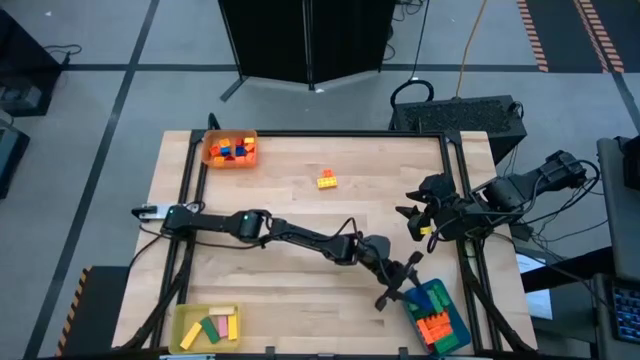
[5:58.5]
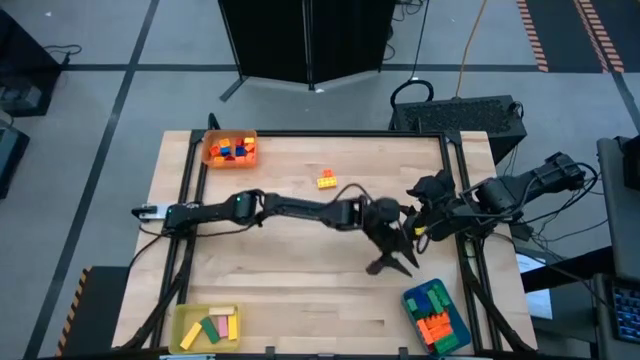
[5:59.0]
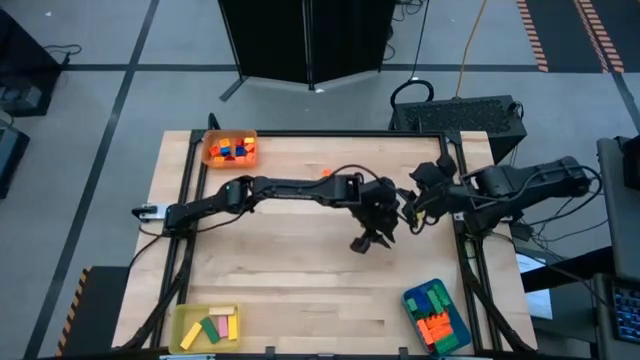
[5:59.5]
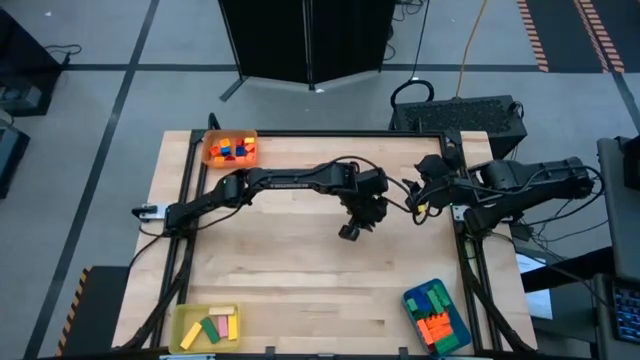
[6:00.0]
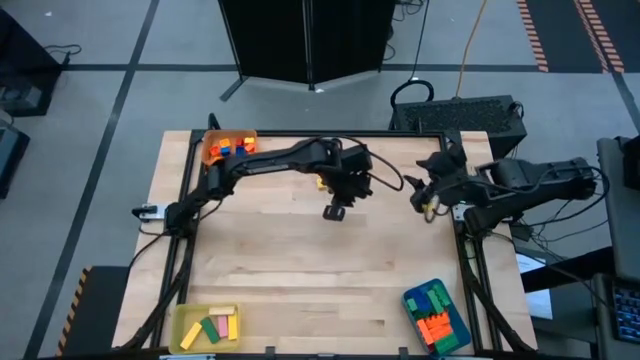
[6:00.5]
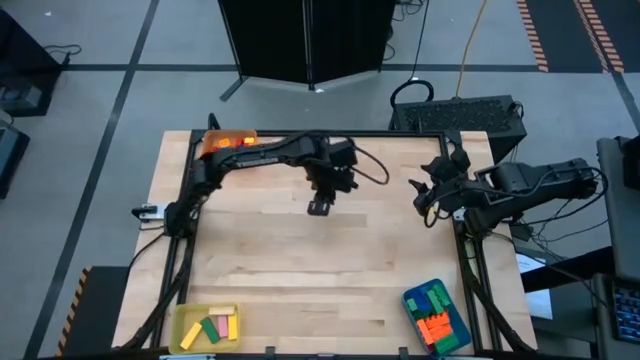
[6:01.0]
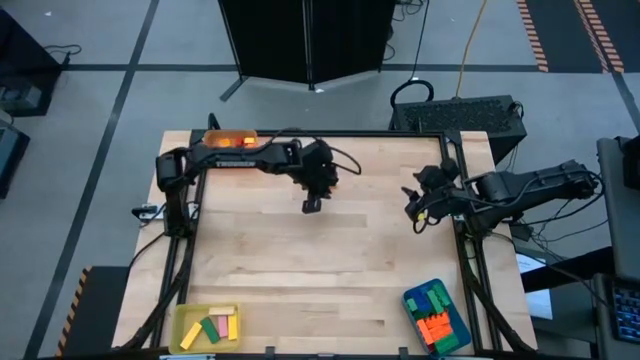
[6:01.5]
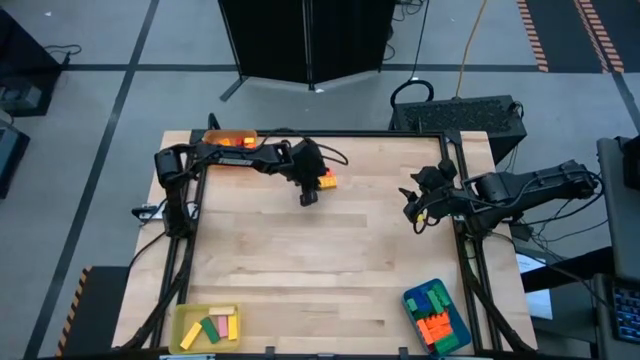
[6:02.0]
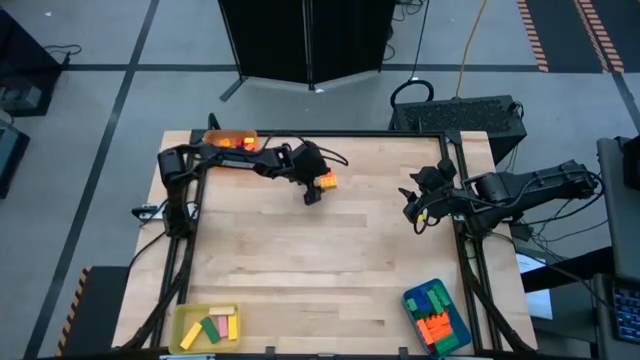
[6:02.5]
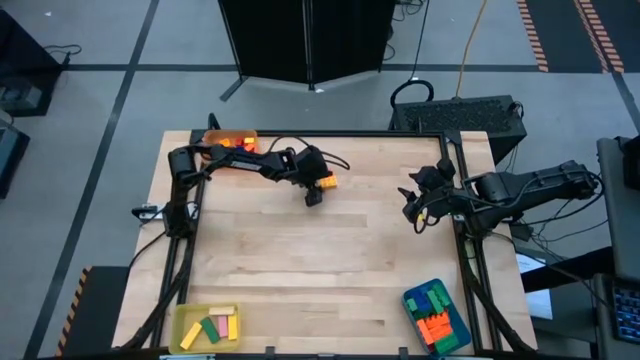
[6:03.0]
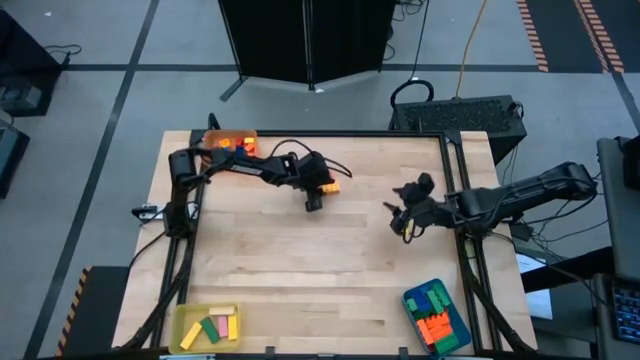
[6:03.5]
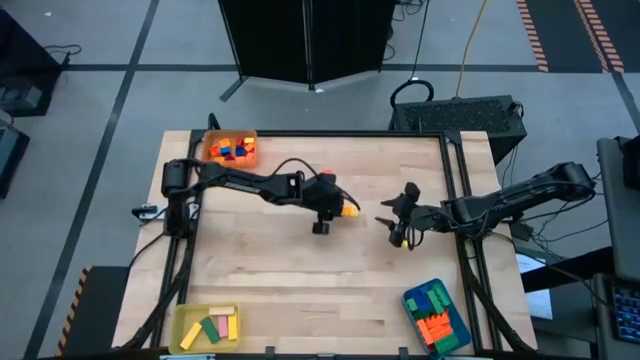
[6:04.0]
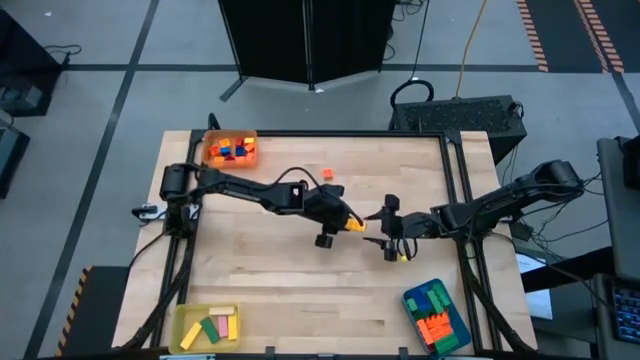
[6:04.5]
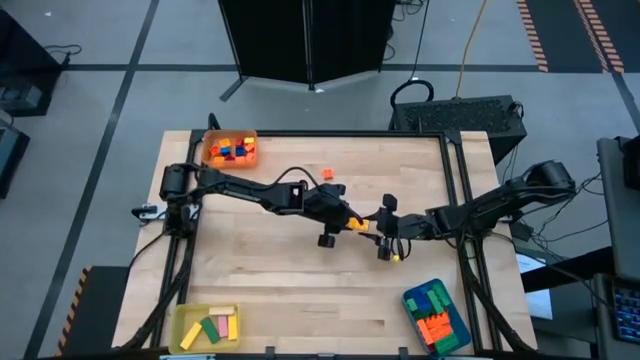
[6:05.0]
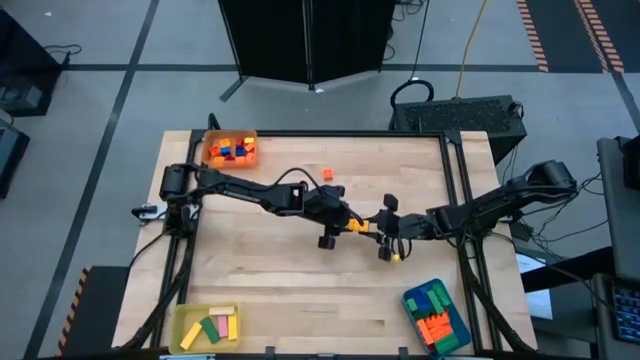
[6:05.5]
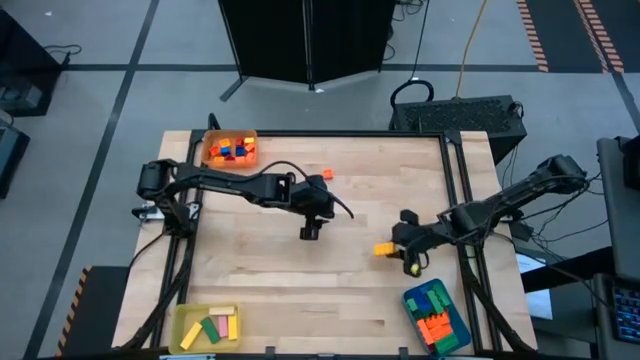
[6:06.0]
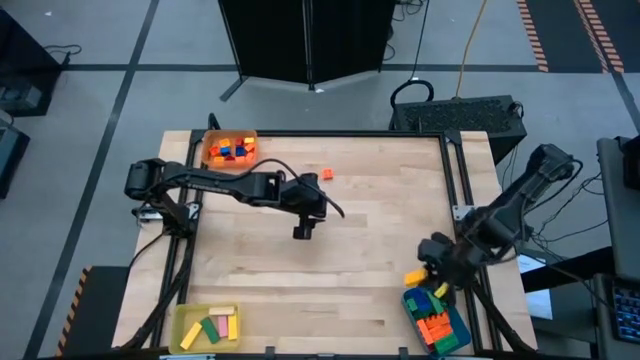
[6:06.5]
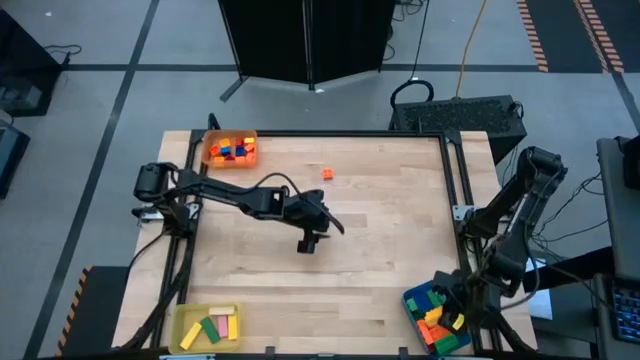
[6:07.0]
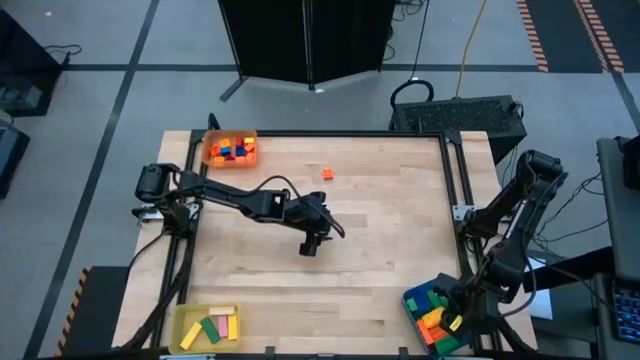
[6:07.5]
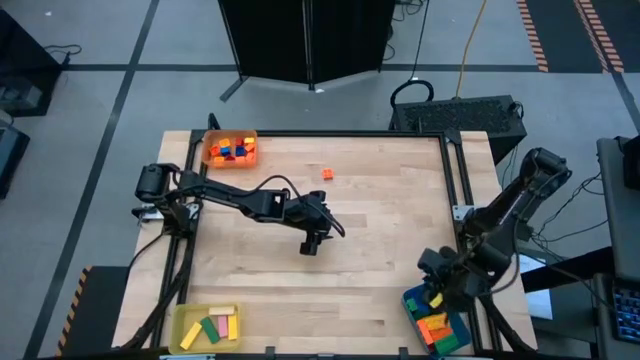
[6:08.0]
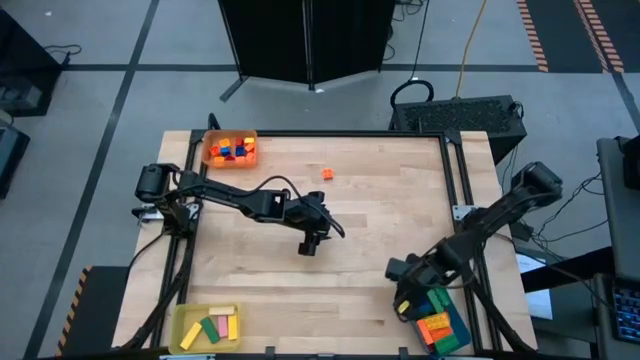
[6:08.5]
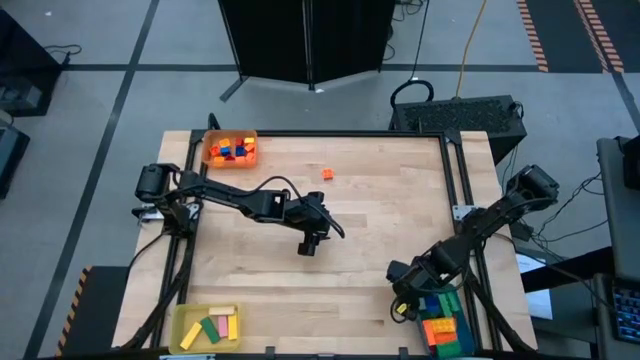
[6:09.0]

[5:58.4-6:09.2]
Task: Sort blocks by size
Put the yellow 8 stud game piece into the blue bin

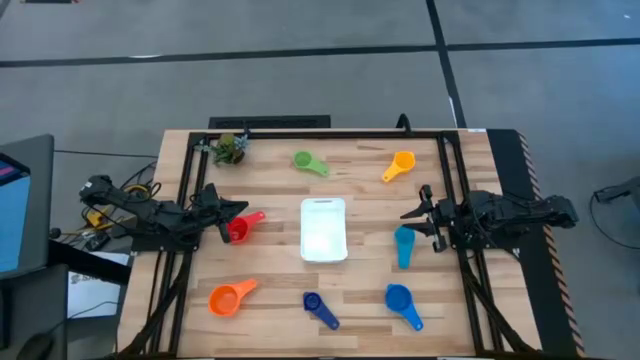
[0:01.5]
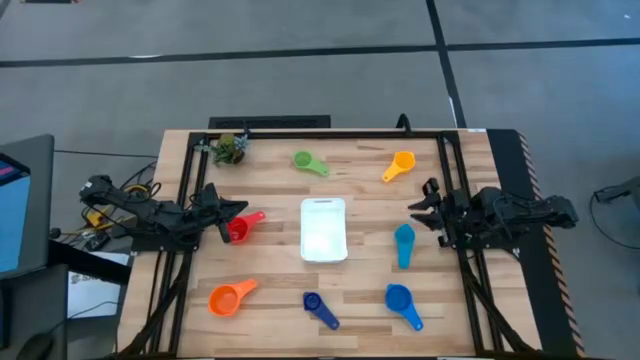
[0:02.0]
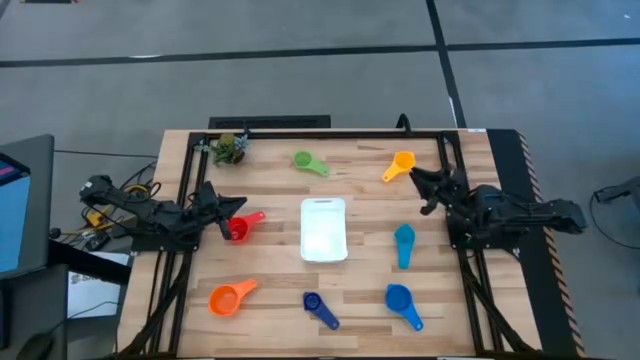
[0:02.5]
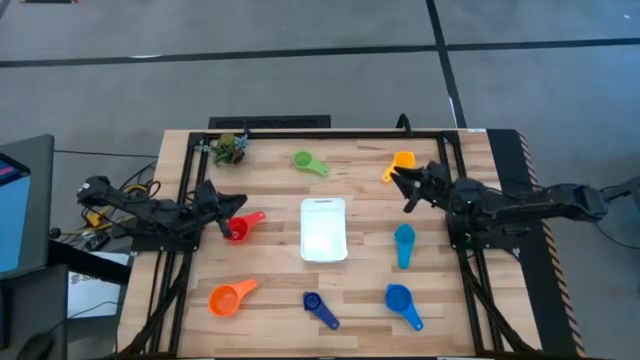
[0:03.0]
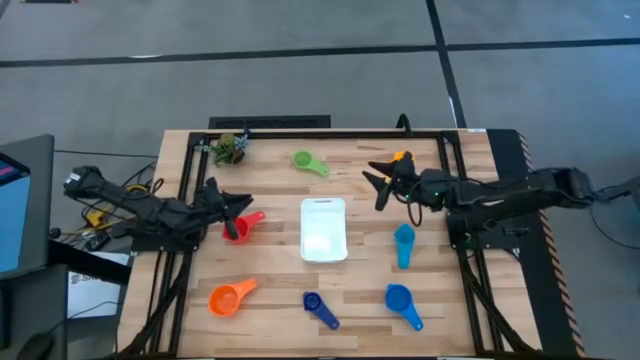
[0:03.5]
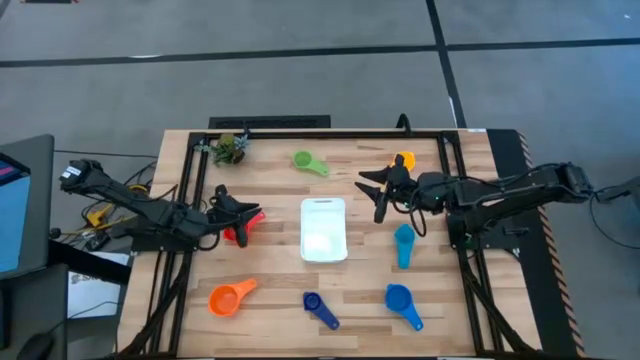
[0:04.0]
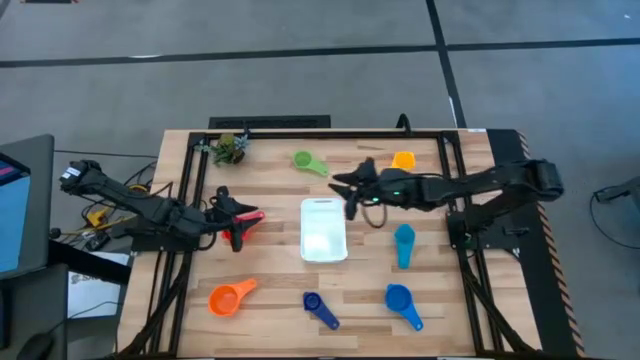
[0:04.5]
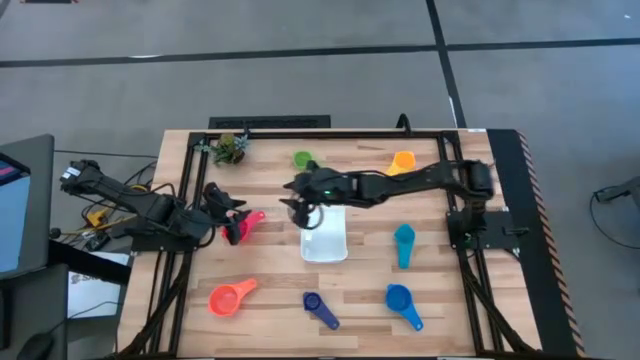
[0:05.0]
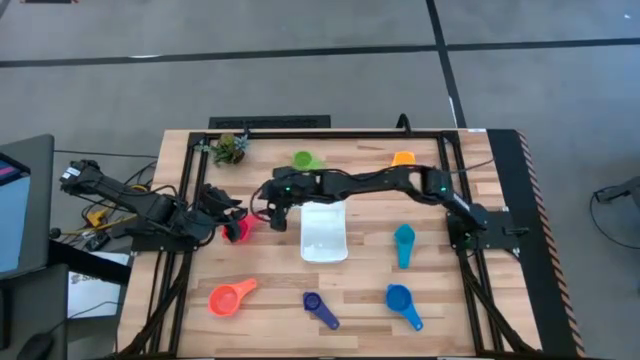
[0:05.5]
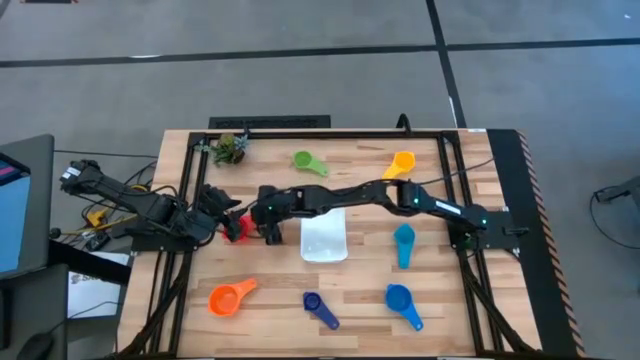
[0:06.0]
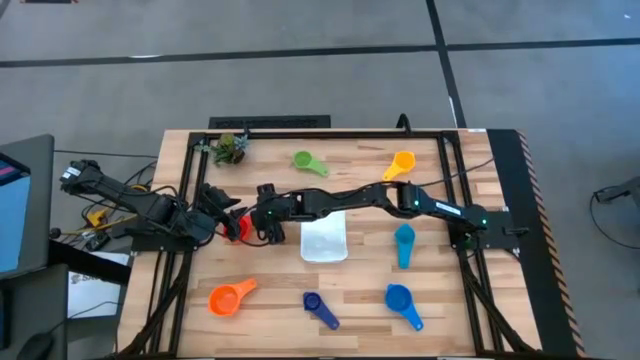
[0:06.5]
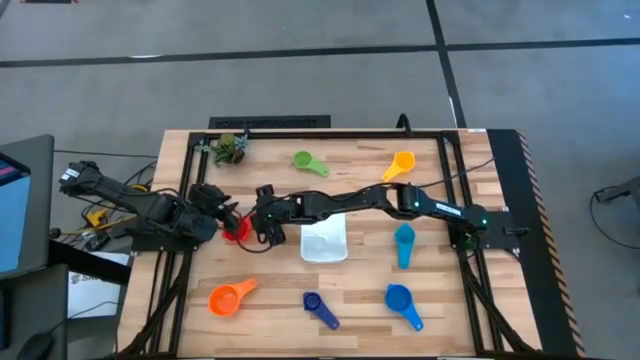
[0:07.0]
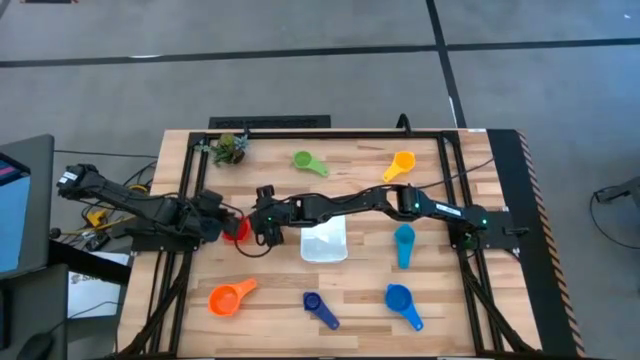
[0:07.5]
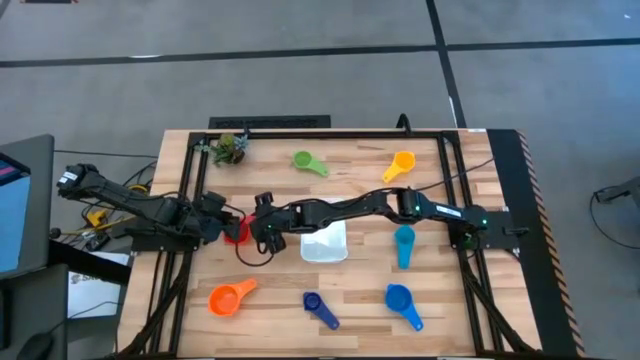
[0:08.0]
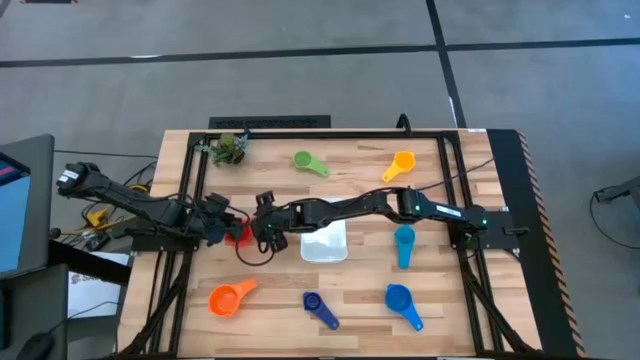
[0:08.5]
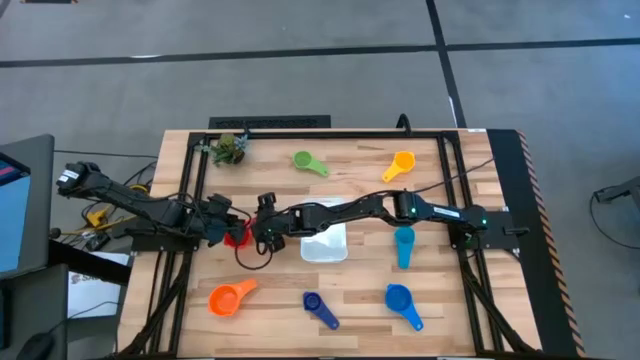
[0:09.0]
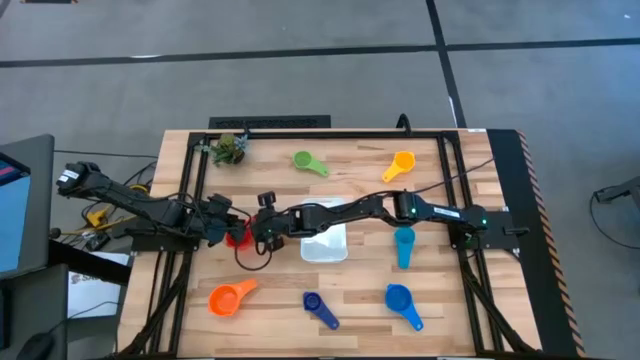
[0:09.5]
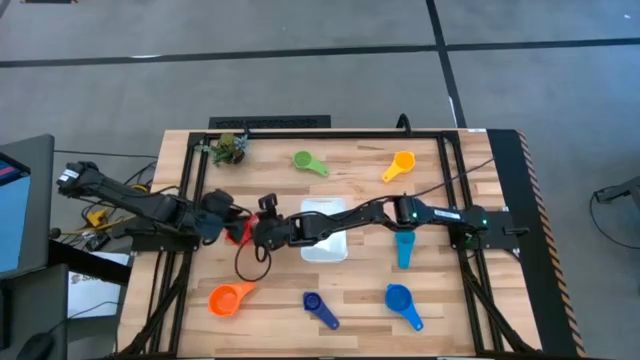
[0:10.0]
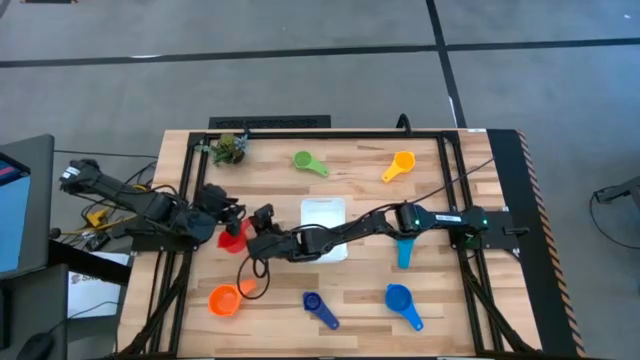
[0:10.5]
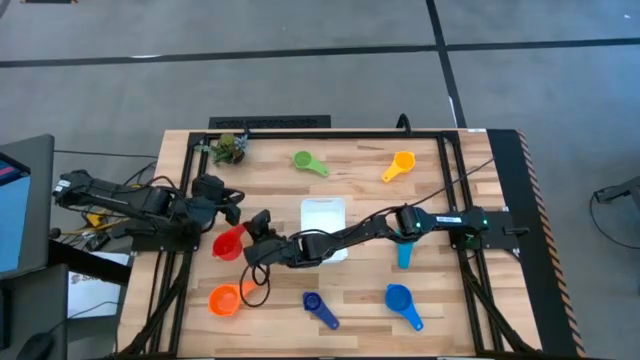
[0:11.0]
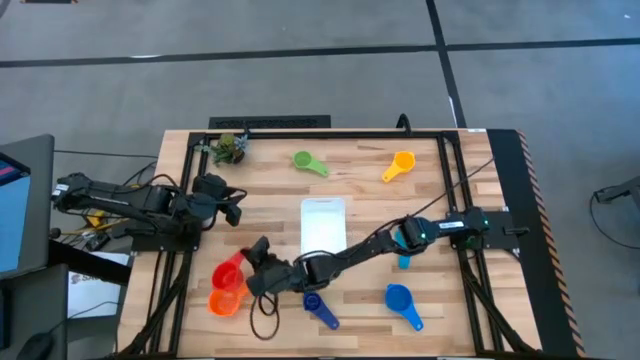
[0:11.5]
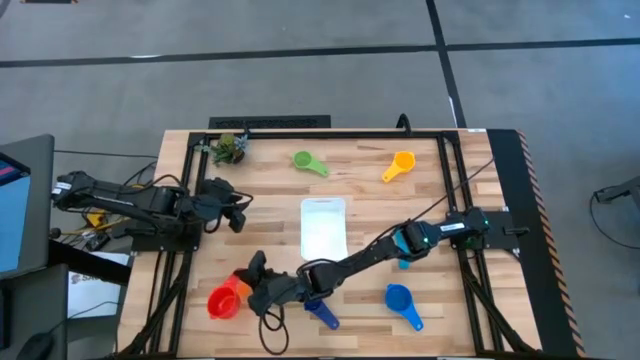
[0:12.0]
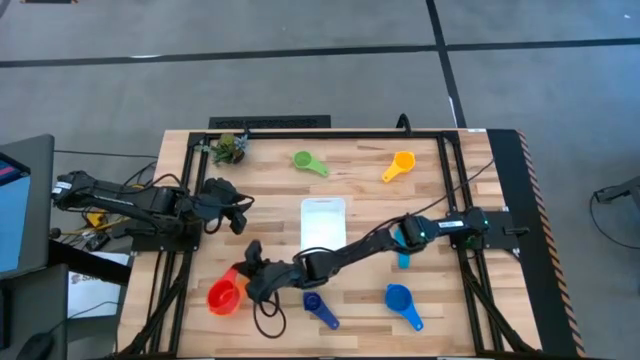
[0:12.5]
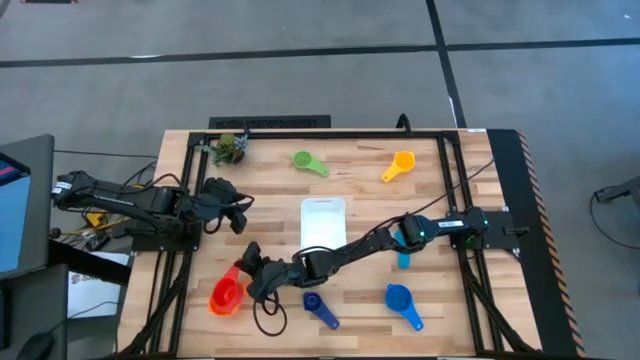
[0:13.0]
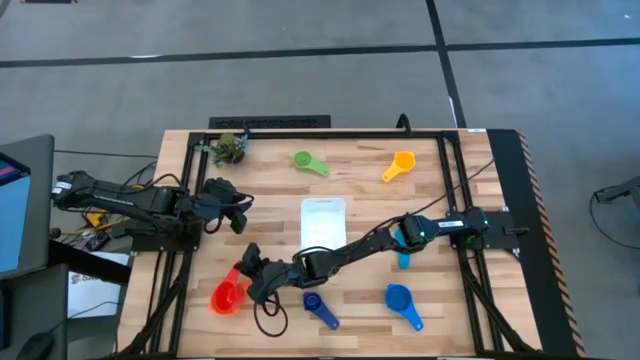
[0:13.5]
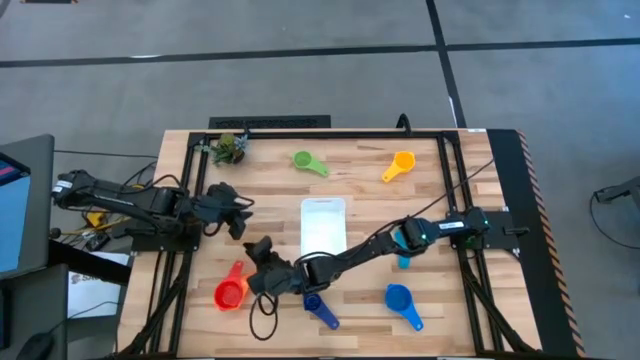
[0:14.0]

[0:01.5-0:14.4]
Task: Nest measuring cups in basket
Stack the red measuring cup on top of the orange measuring cup
